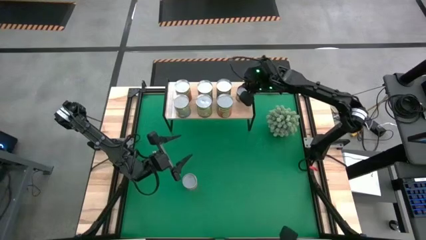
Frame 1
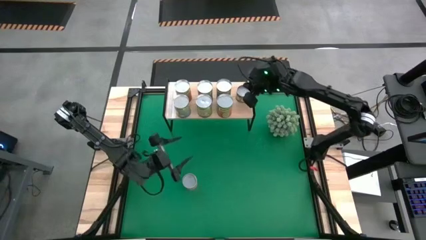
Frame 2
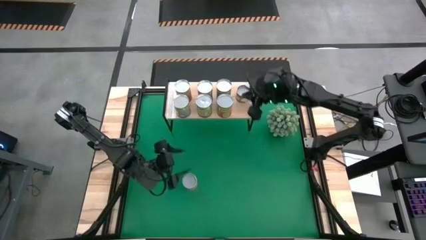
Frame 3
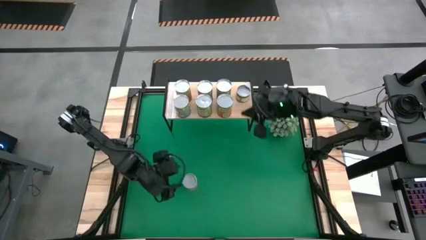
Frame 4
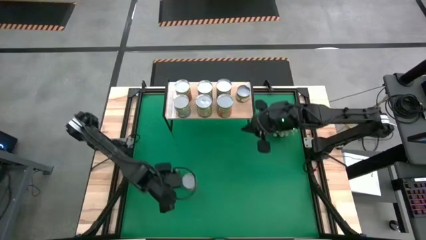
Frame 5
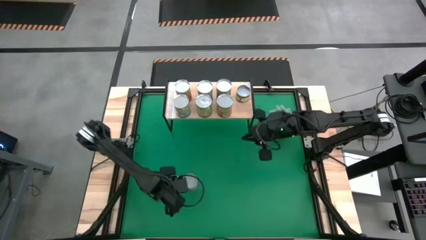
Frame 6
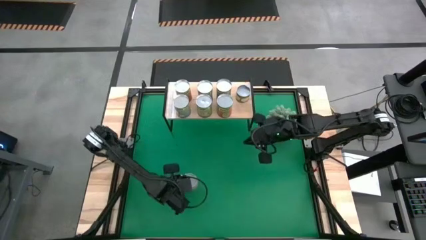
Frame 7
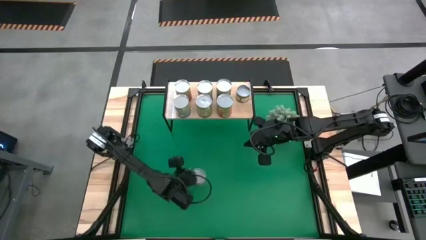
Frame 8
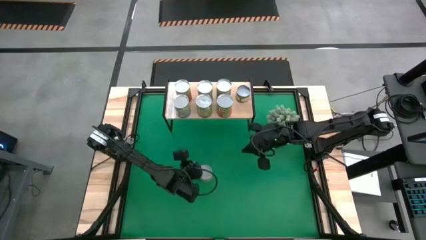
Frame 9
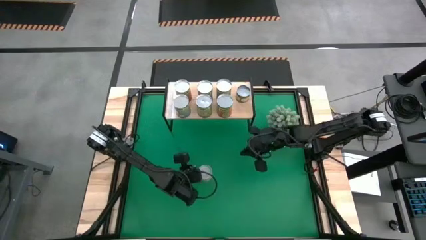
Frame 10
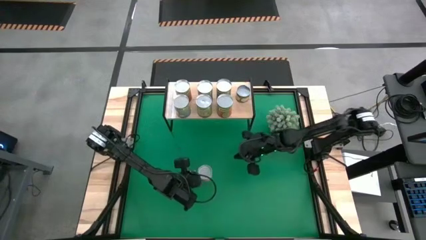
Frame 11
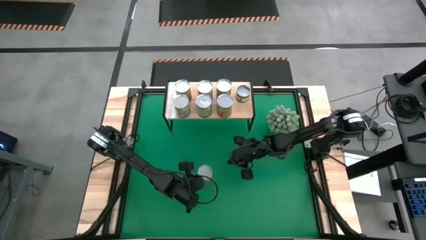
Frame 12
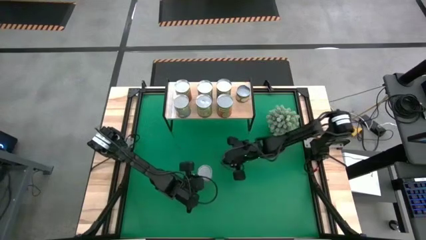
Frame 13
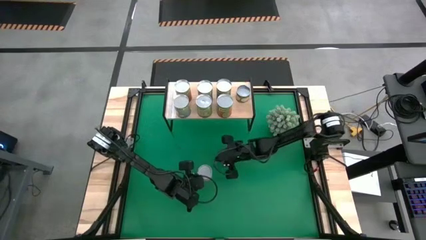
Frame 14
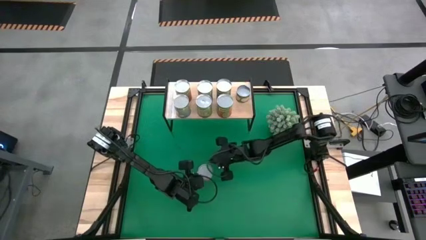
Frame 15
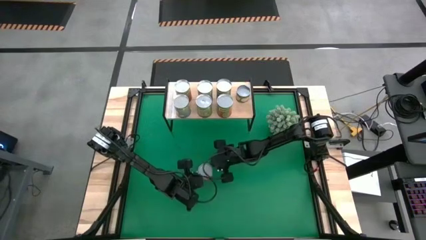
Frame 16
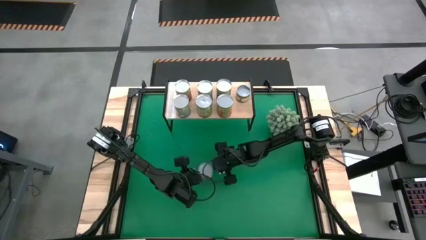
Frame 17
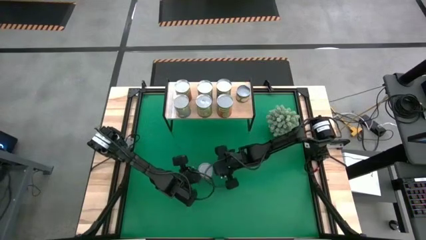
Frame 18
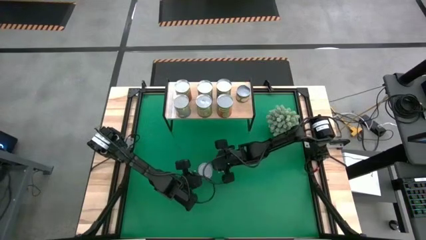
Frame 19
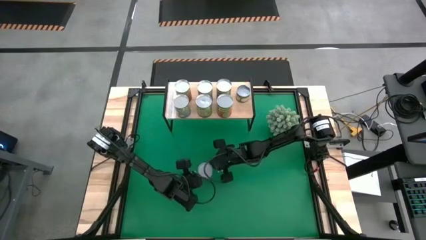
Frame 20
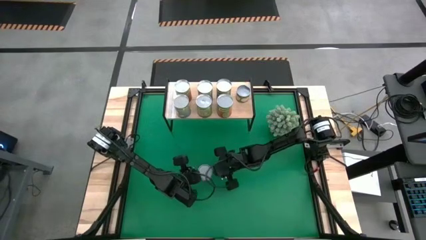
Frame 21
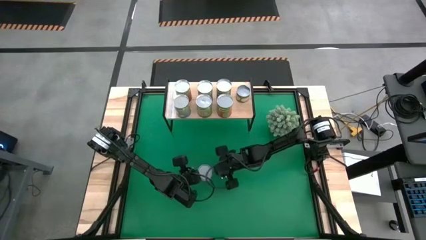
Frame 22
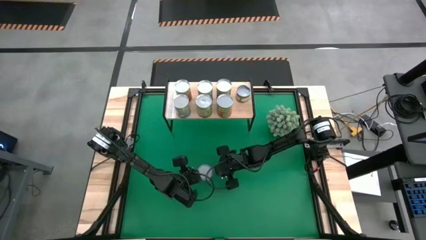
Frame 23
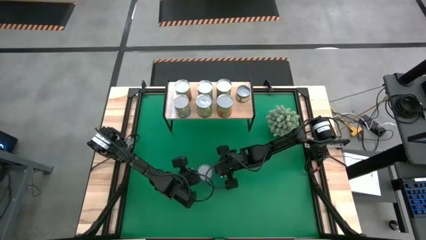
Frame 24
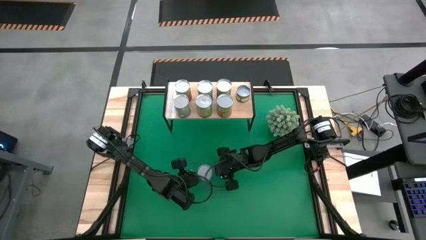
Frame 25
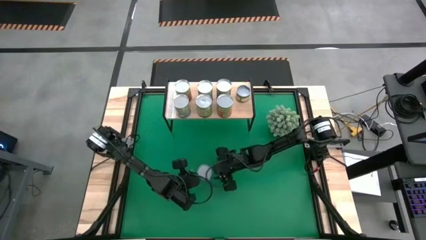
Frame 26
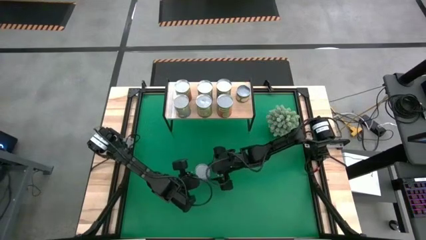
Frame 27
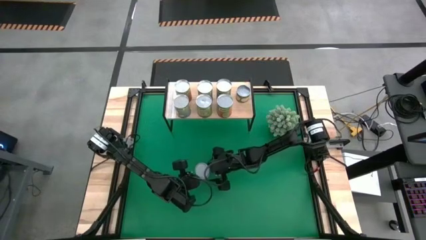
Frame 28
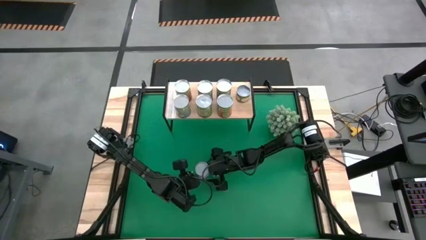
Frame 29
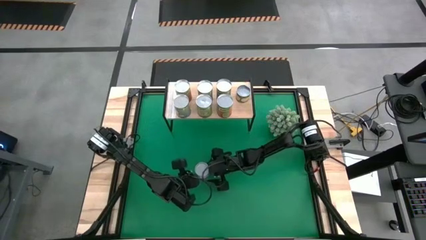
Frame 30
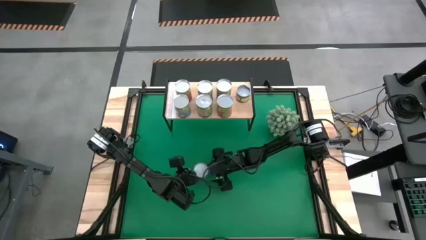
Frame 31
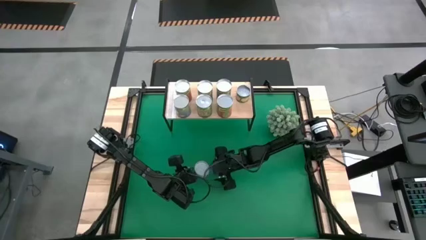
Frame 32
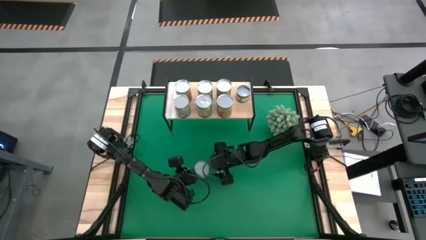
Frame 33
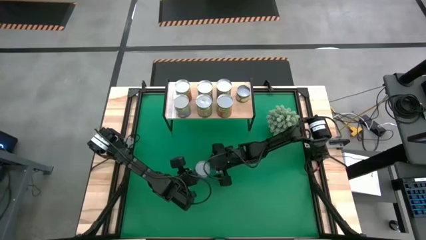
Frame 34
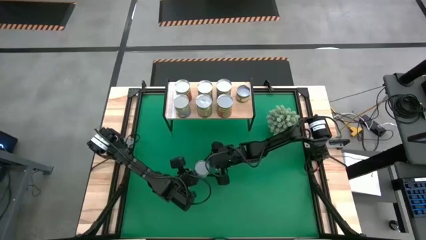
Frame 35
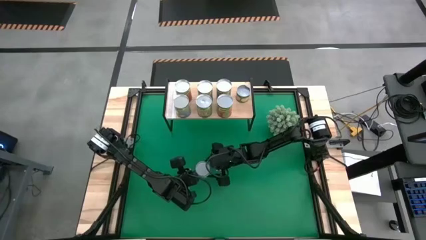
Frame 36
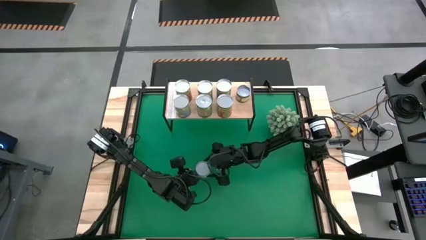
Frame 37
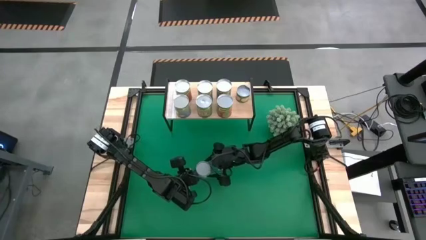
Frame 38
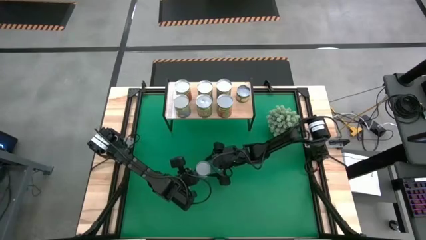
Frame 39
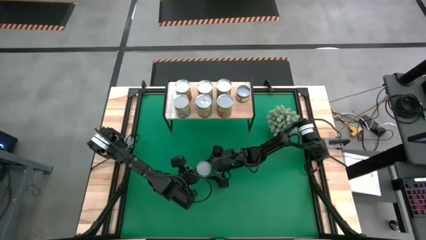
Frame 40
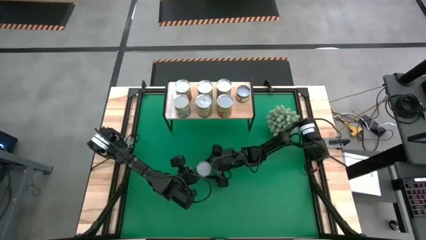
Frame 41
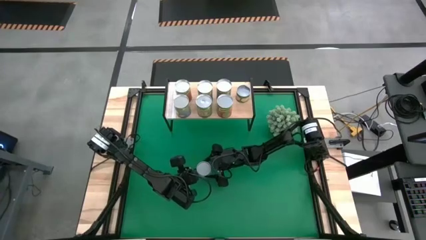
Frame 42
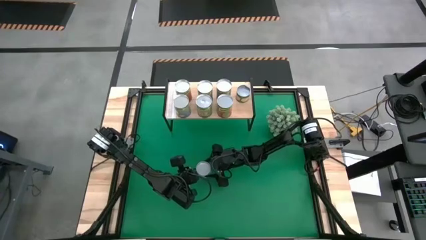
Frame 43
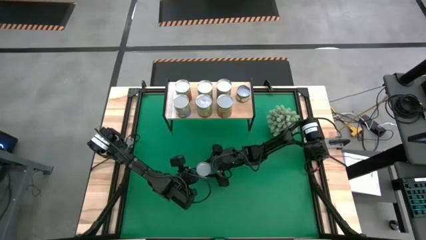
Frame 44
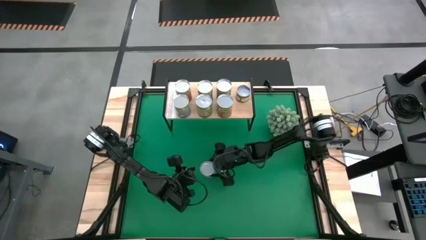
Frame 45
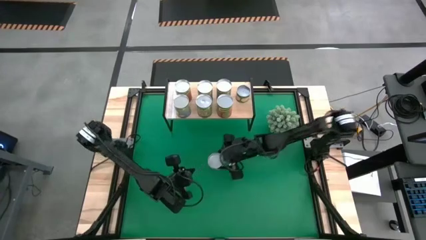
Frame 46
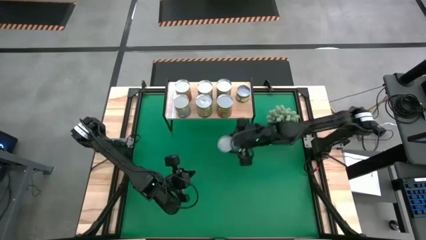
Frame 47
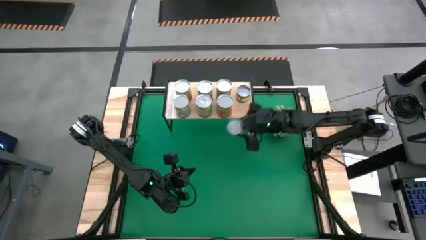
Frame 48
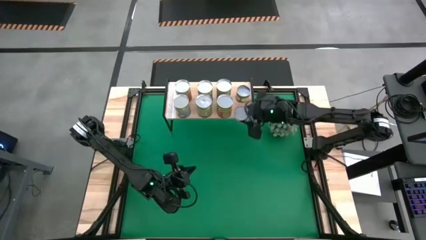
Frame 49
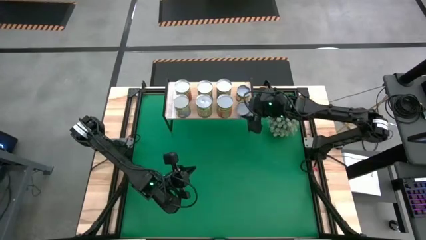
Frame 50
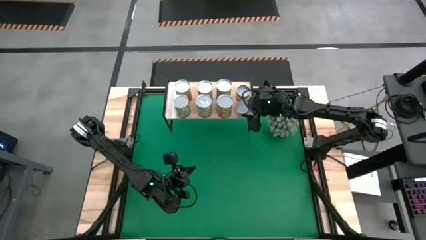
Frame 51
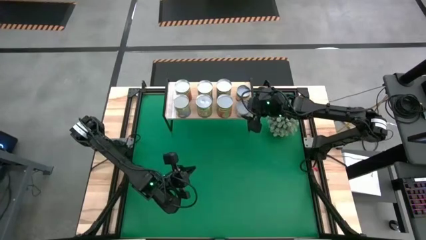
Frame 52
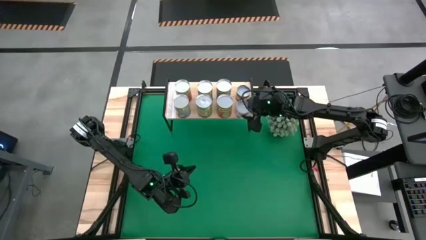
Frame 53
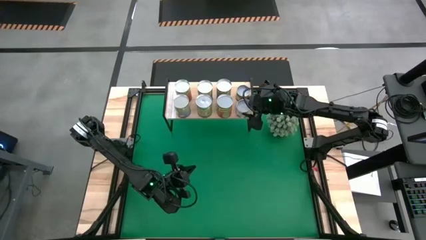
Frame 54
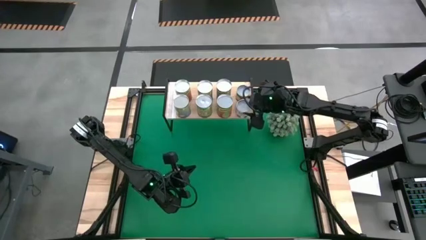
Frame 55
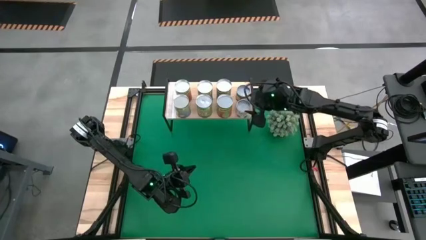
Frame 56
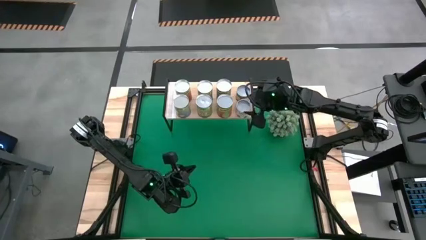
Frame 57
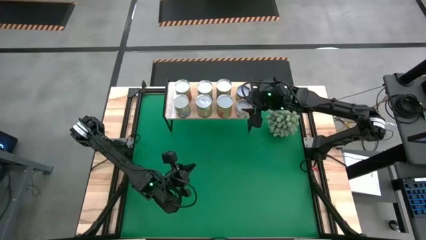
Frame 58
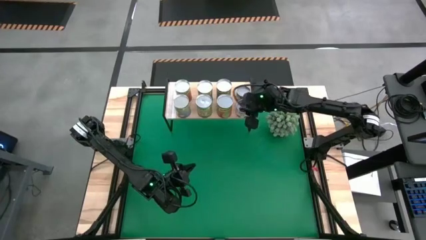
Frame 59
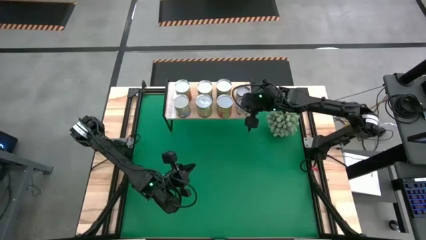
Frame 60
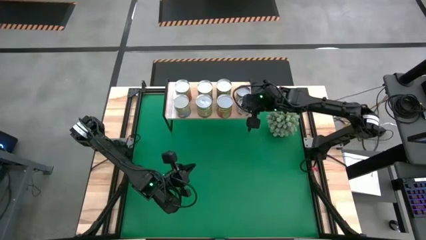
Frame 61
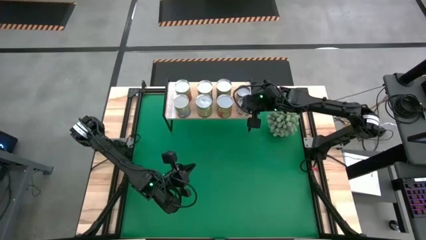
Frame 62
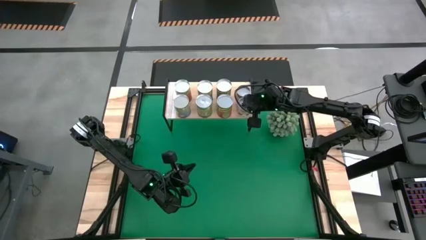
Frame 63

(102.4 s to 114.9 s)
Task: Pick and place cans onto a shelf
Put the canned meatballs on the shelf

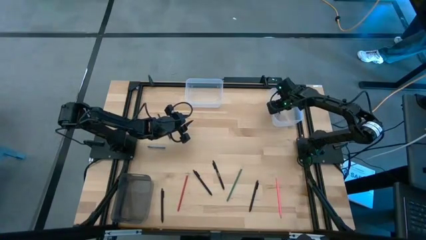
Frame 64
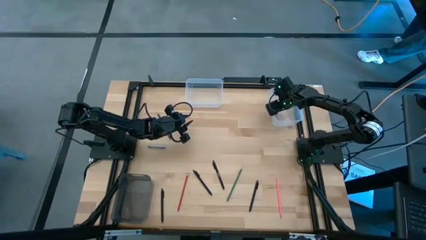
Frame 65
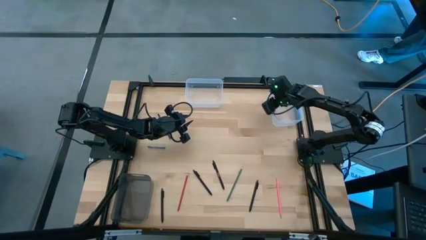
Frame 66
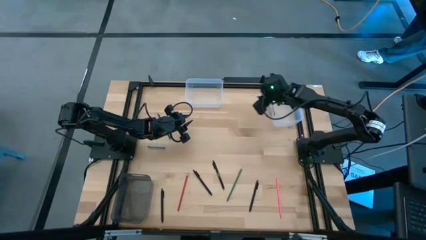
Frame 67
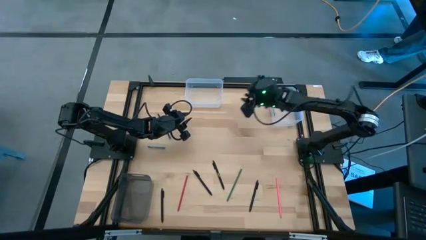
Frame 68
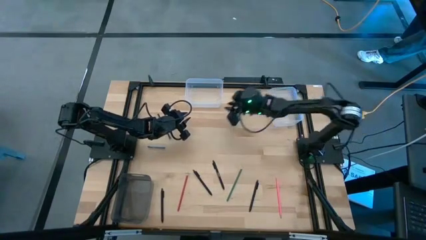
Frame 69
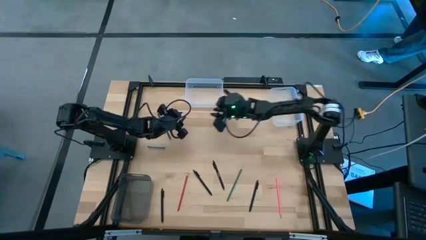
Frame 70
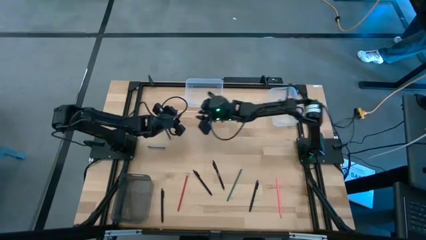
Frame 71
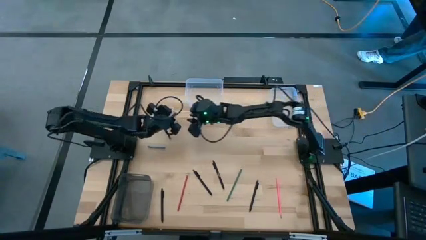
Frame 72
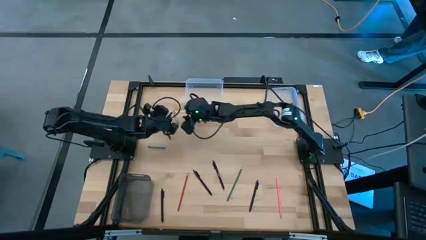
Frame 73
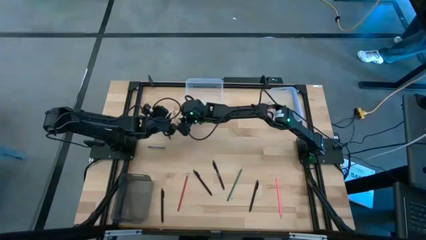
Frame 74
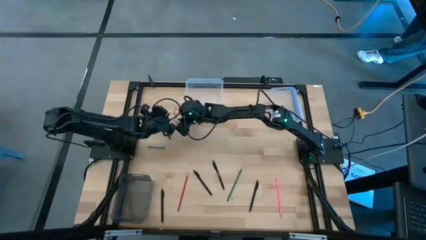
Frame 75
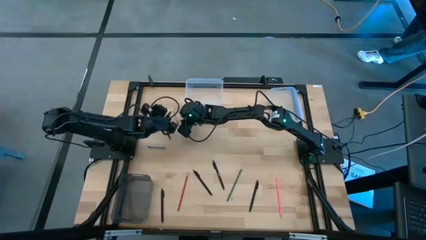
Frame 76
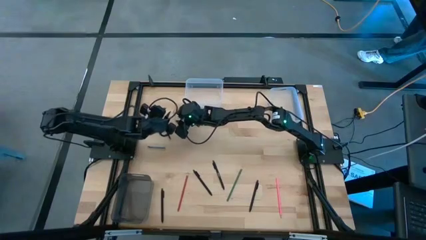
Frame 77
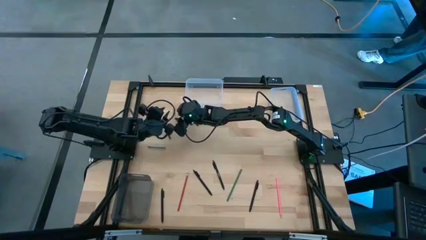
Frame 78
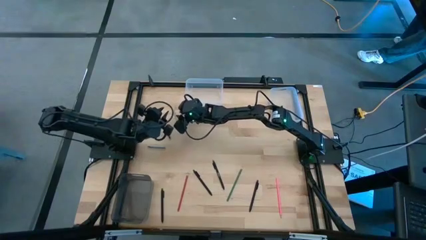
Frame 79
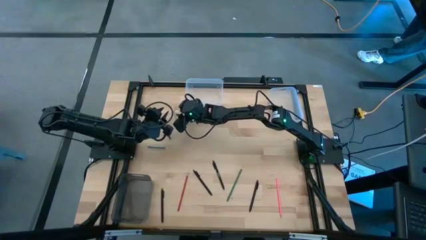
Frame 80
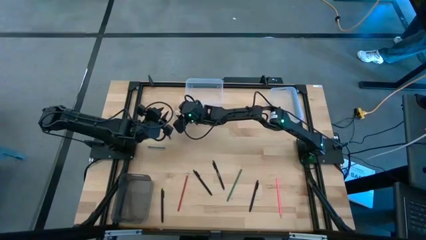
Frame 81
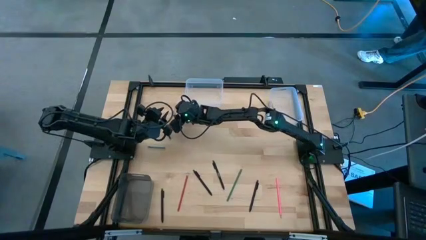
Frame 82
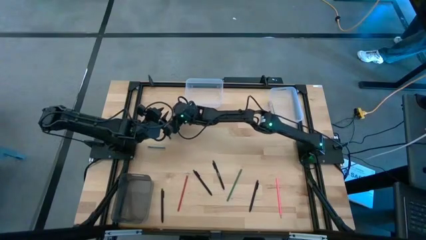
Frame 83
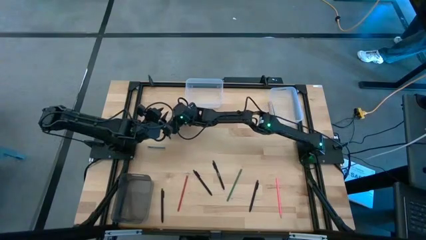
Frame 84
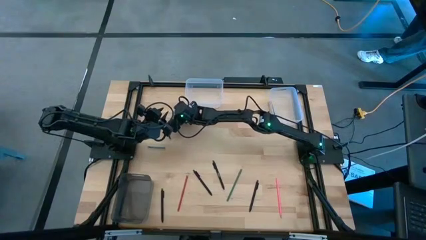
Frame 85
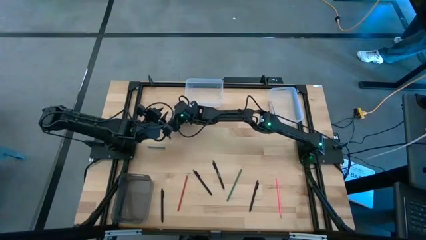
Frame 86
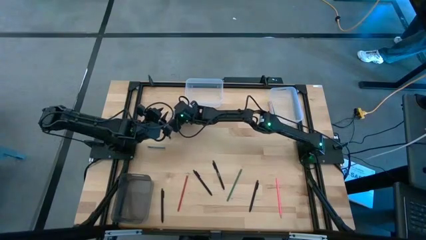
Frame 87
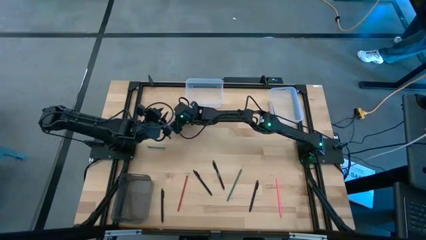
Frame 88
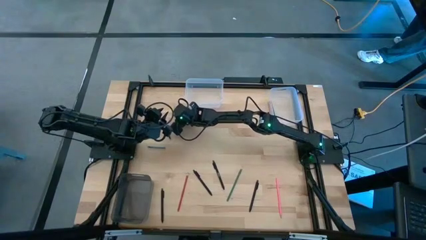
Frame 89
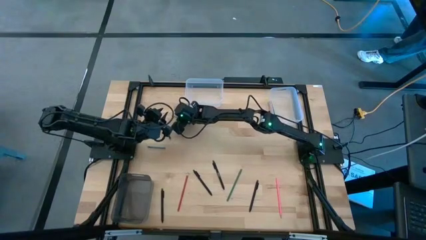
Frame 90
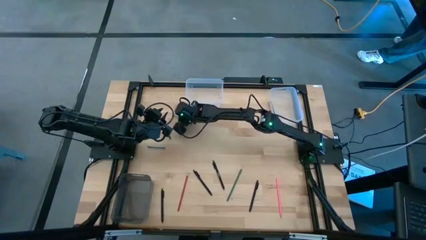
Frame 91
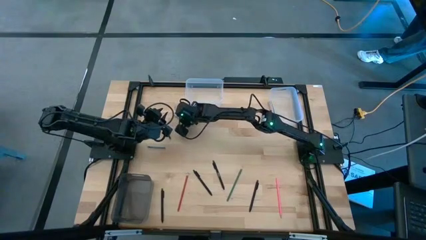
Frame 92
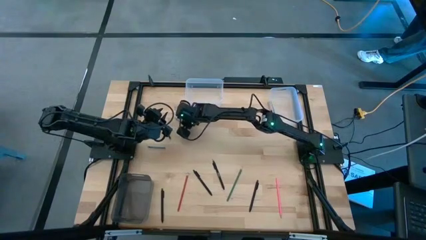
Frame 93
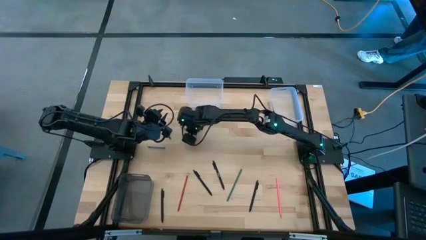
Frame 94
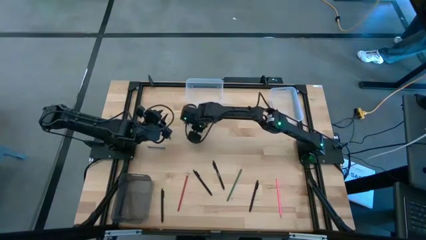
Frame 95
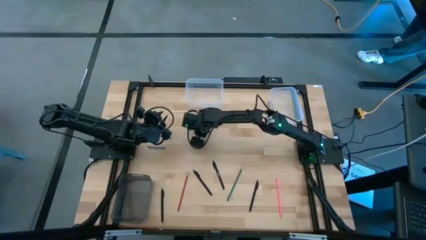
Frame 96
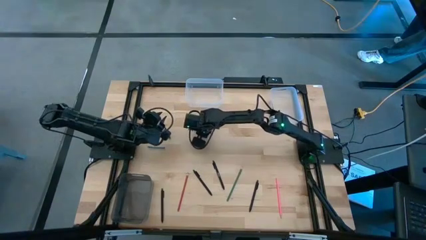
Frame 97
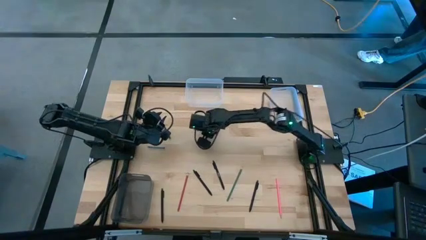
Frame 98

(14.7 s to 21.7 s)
Task: Sort crayons/erasers/pens/pencils in bins
Put the top gray crayon into the right transparent bin
